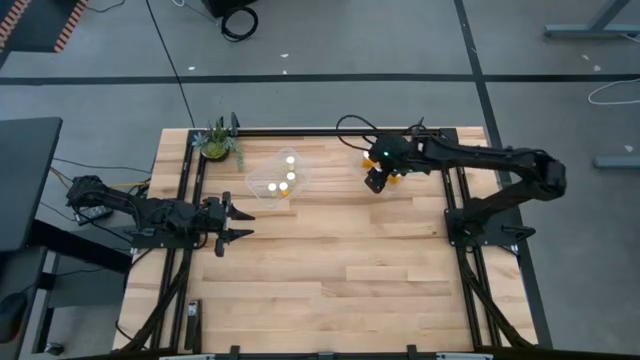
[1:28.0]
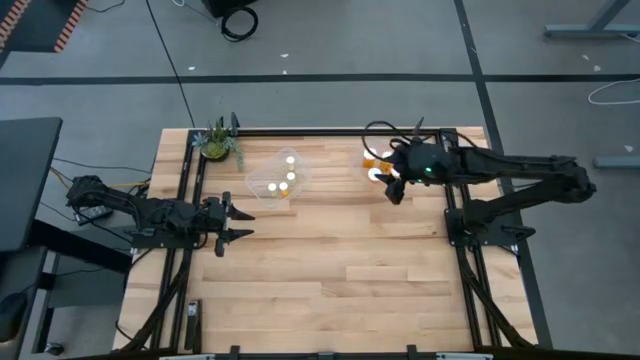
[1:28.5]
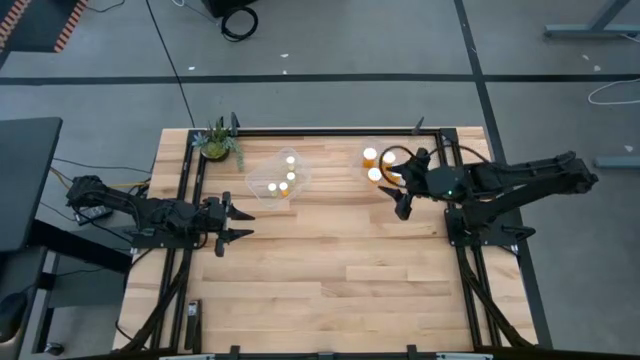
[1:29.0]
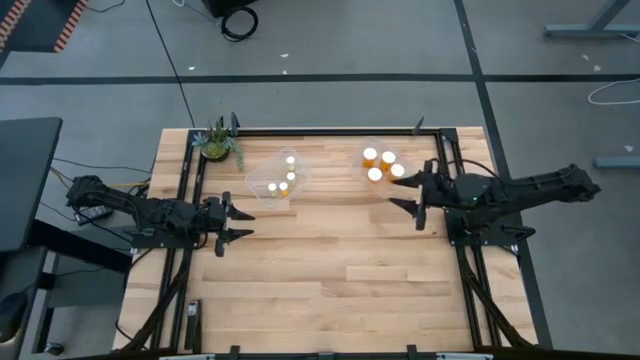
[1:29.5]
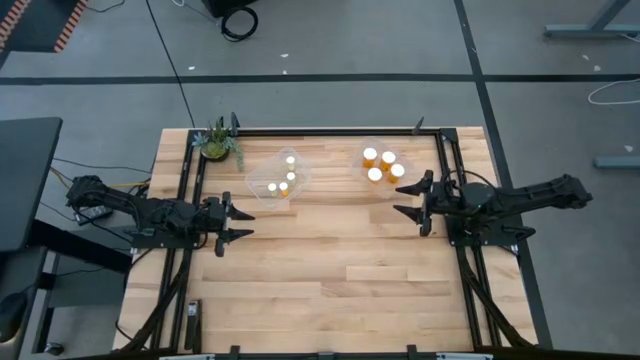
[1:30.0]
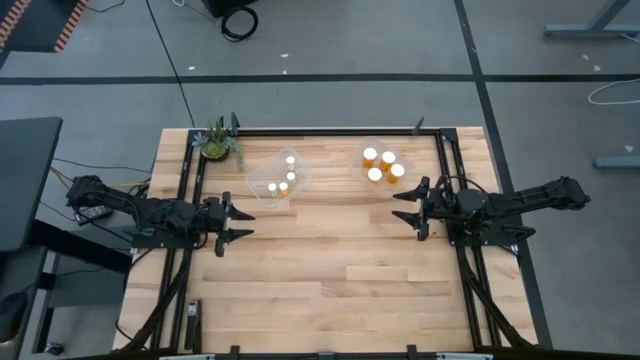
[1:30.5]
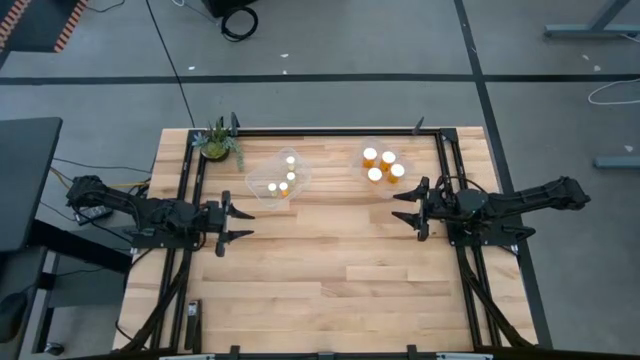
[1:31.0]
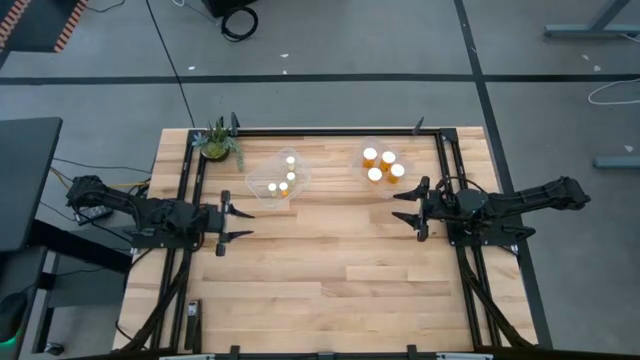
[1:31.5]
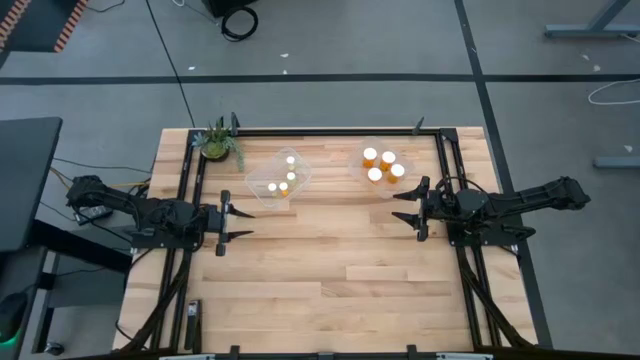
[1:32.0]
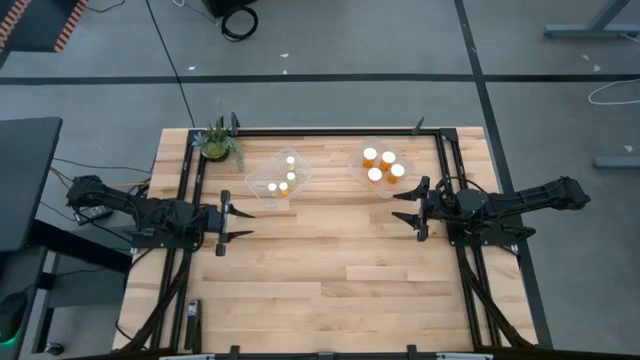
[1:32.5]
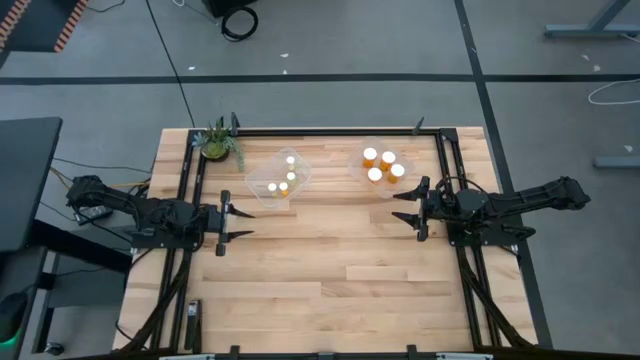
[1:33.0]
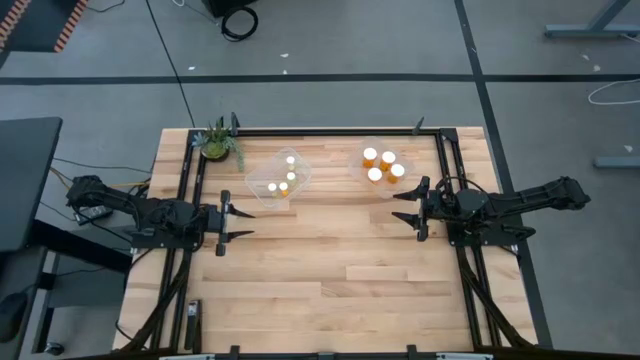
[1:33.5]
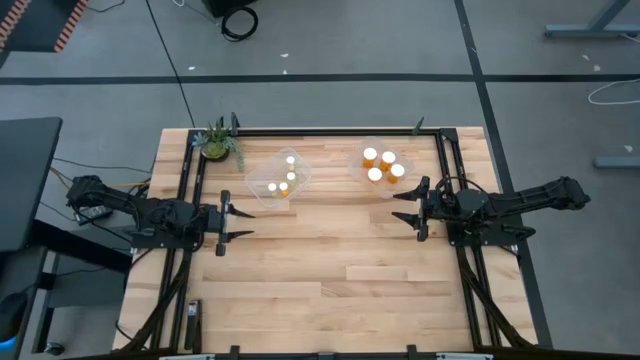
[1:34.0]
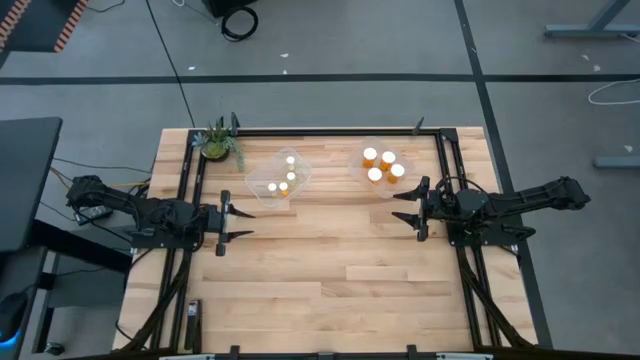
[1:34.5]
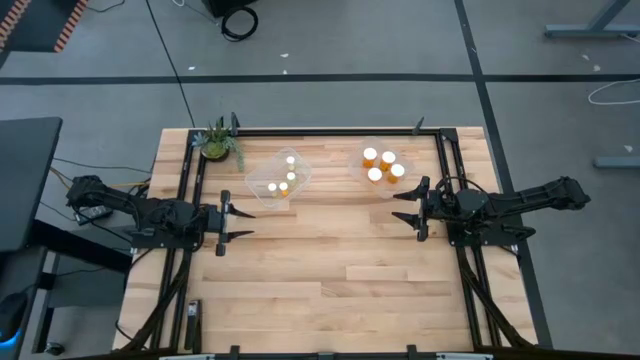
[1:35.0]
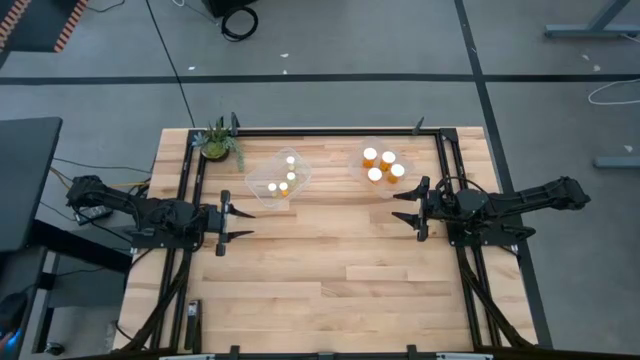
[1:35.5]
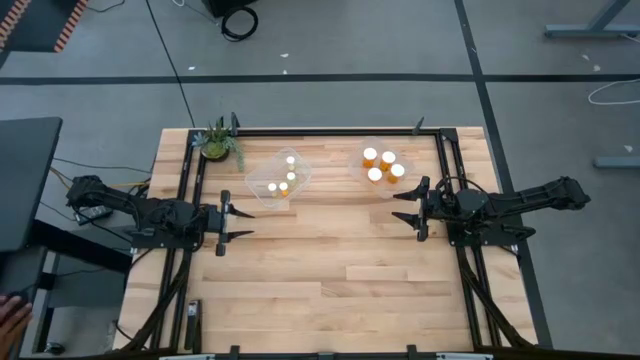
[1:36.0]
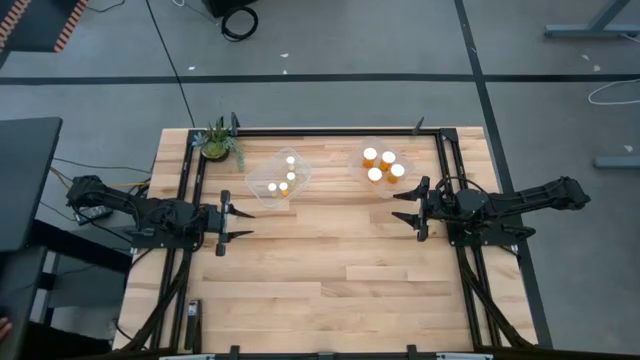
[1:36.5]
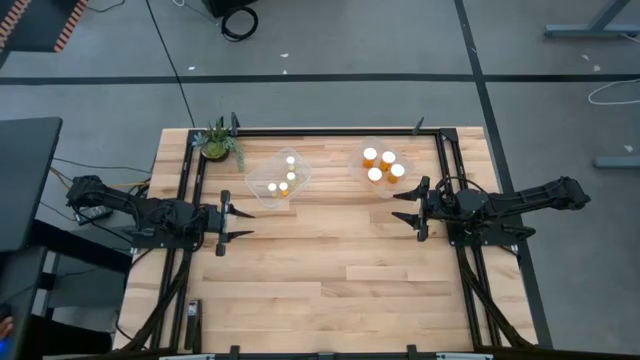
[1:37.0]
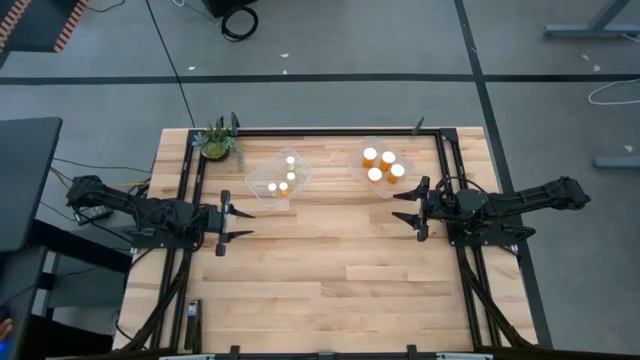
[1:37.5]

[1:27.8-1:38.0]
Task: Pick and place medicine bottles into bin by pill shape (circle, oval)
Return to Home Position

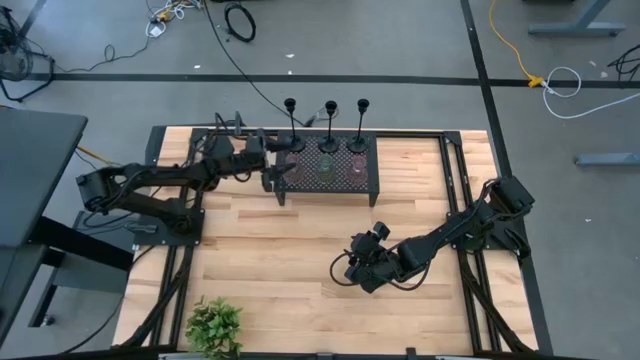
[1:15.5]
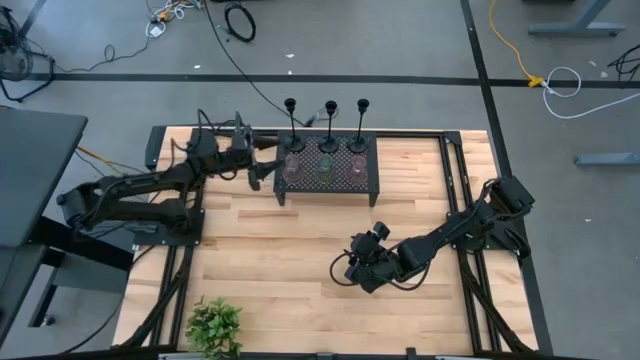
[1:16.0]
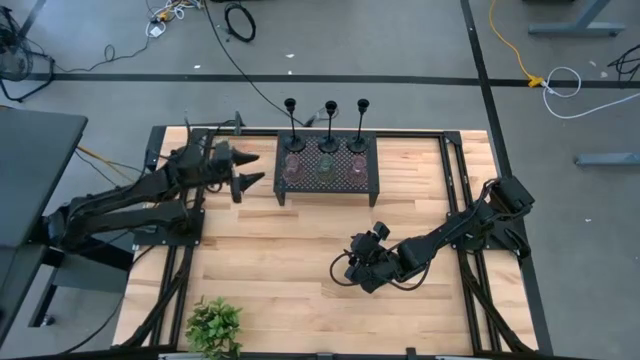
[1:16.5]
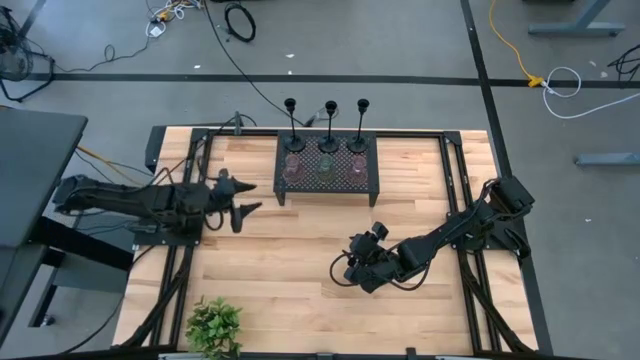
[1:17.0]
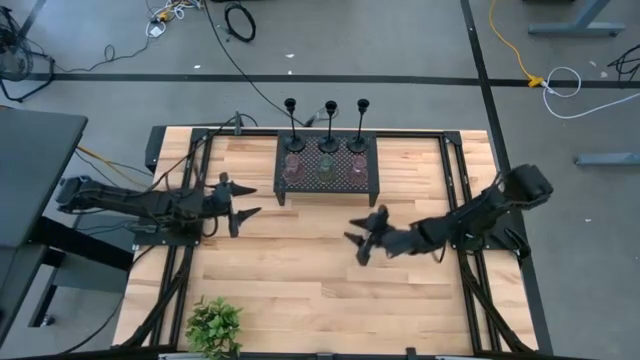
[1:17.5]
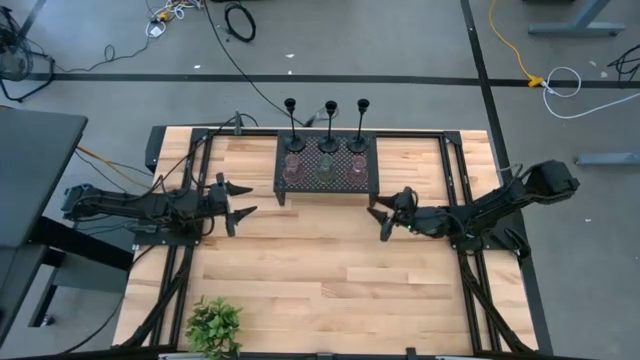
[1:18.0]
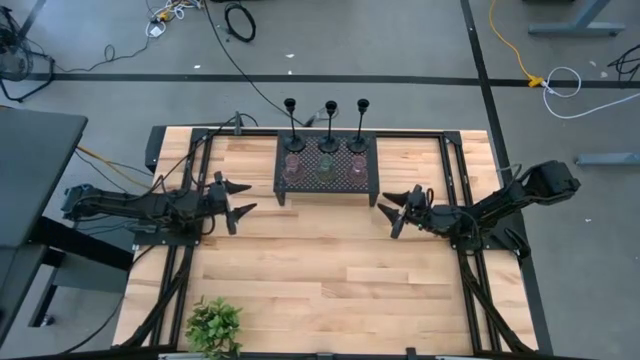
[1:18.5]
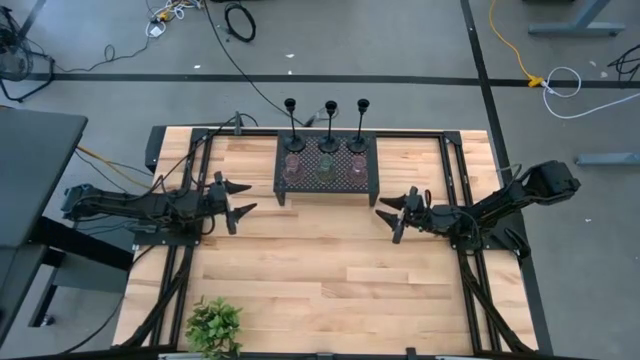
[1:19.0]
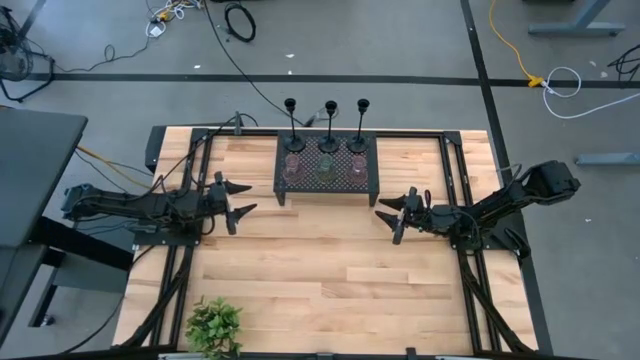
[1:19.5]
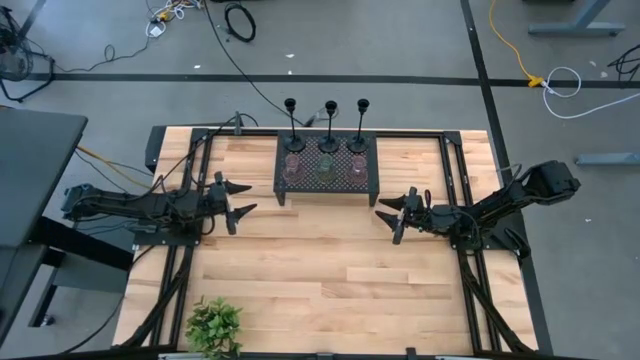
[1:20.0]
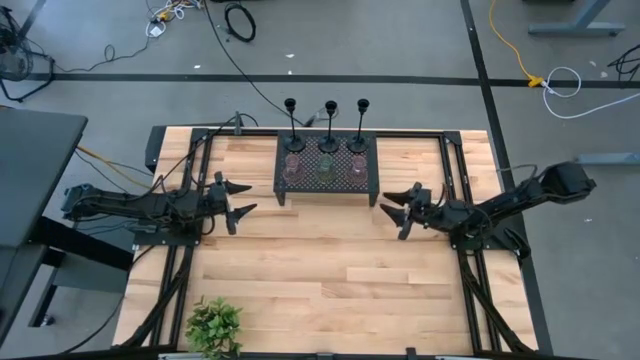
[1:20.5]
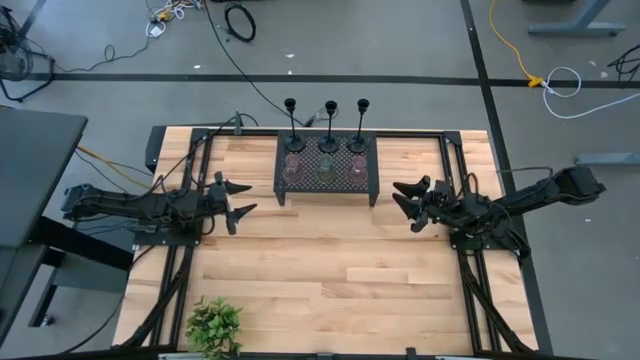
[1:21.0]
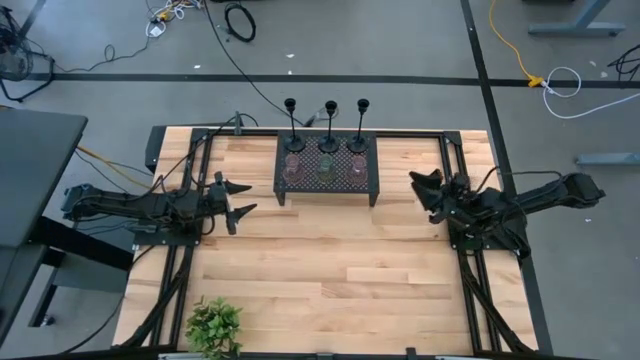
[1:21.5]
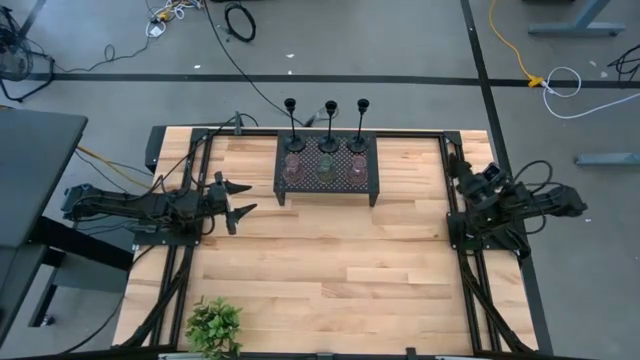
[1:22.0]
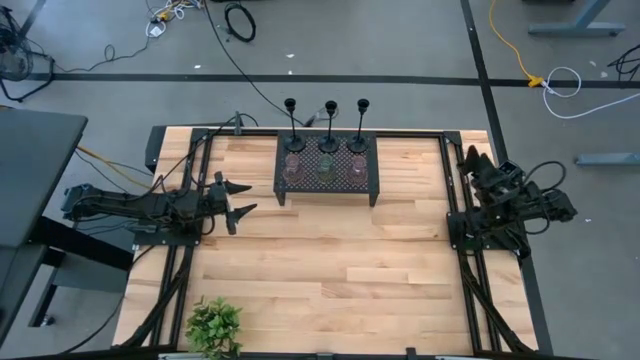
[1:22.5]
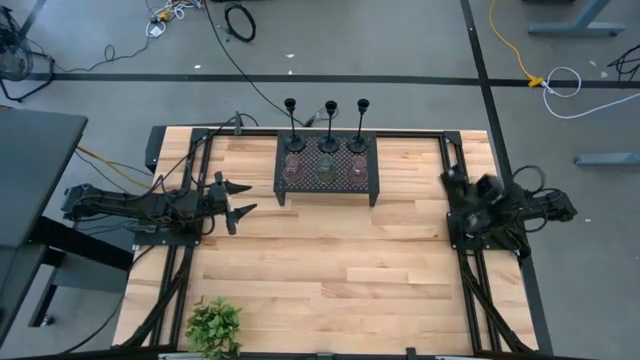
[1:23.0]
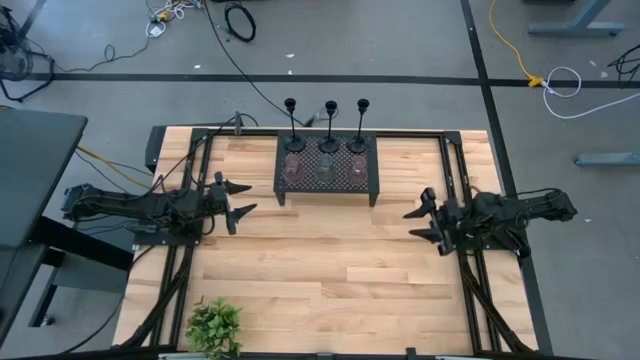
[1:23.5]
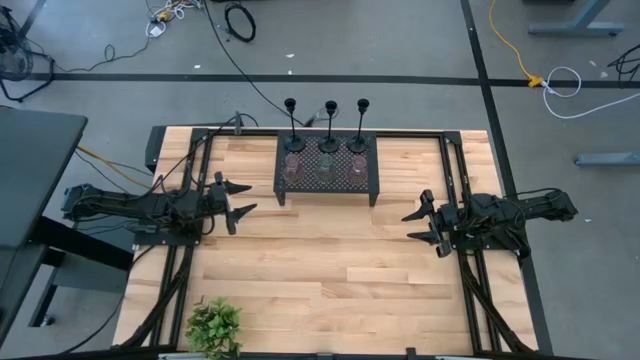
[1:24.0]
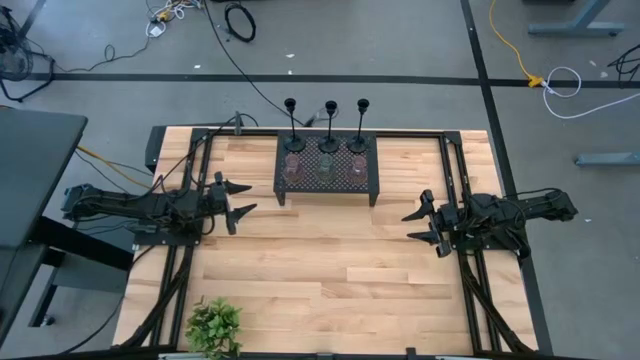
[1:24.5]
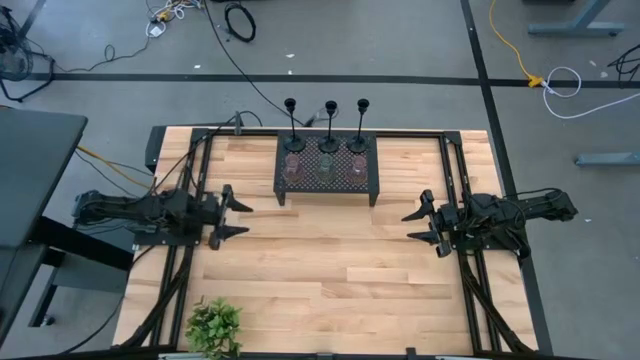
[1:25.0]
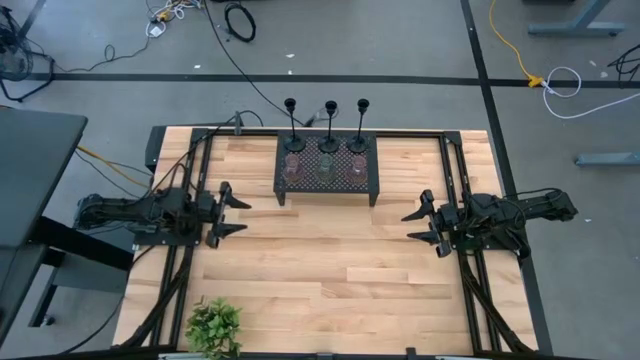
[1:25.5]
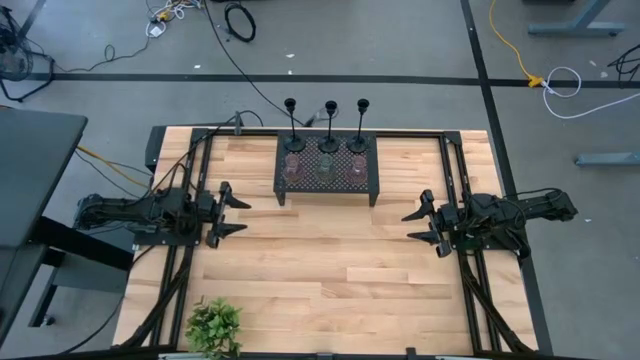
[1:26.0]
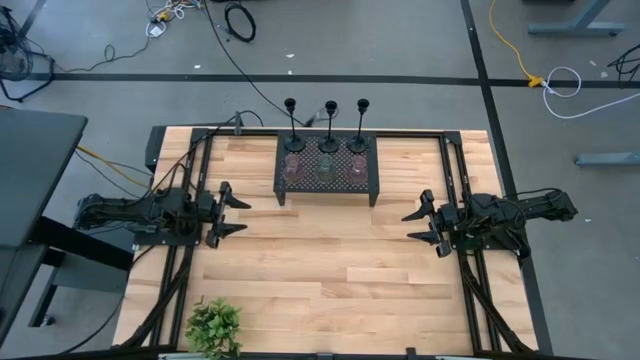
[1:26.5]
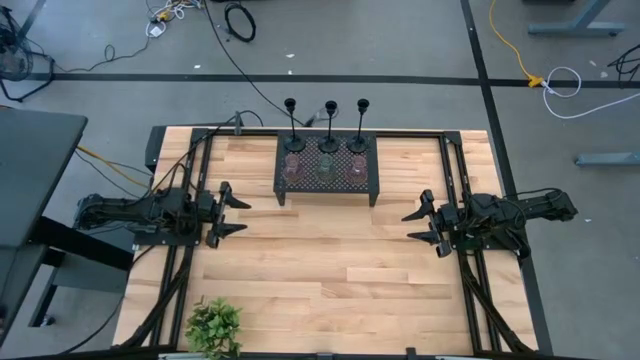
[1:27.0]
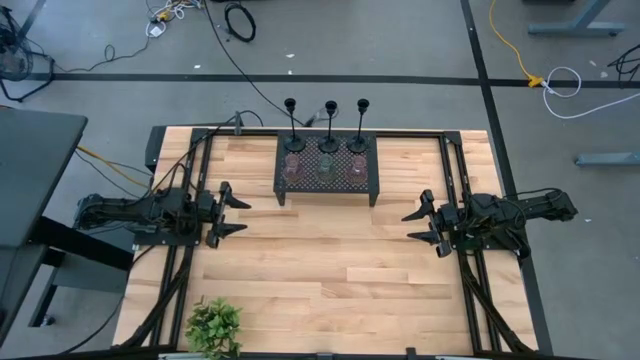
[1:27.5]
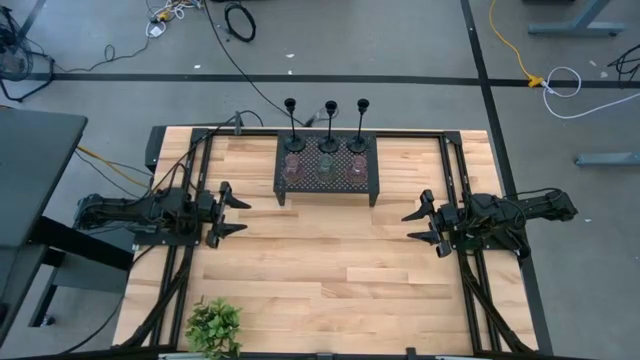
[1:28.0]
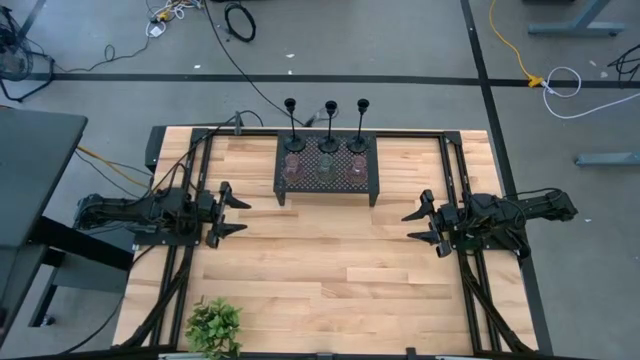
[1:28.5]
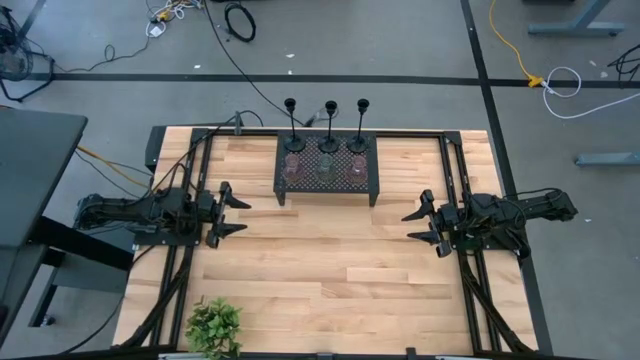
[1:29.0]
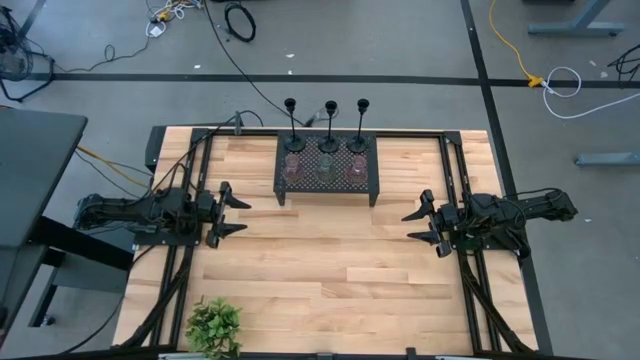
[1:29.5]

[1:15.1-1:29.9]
Task: Pick & Place candle stick holders
Return to Home Position
